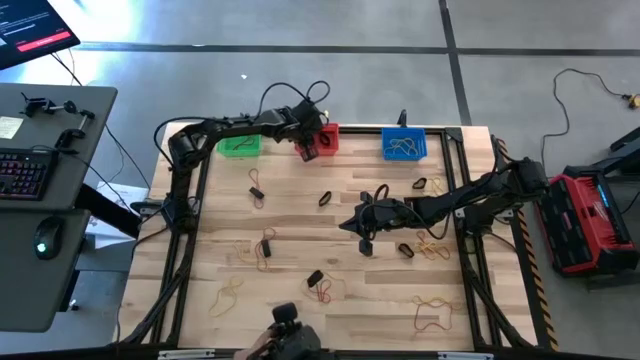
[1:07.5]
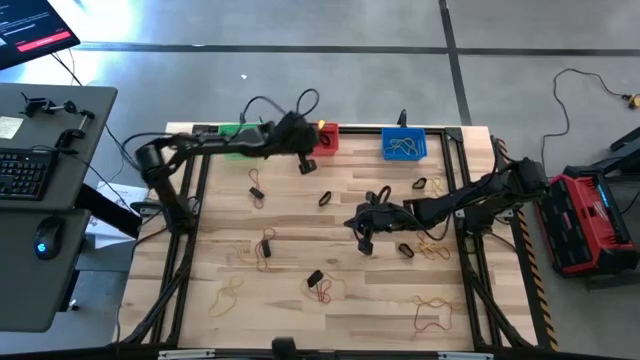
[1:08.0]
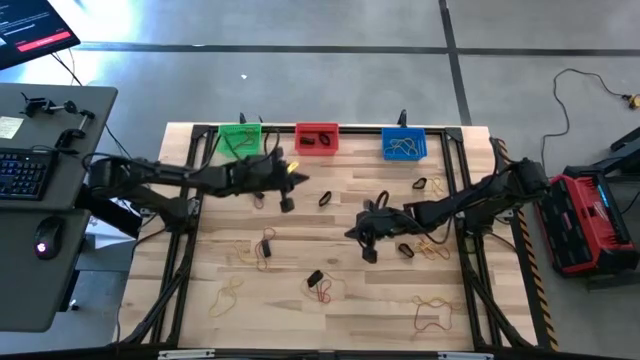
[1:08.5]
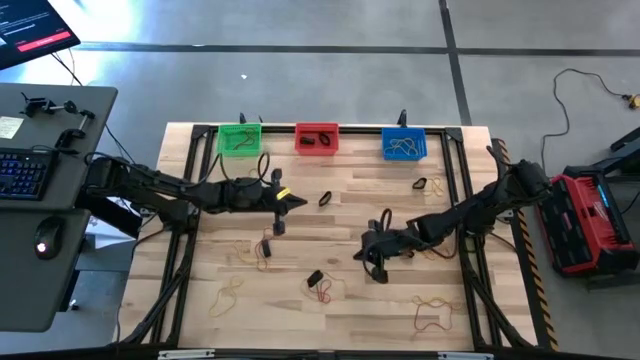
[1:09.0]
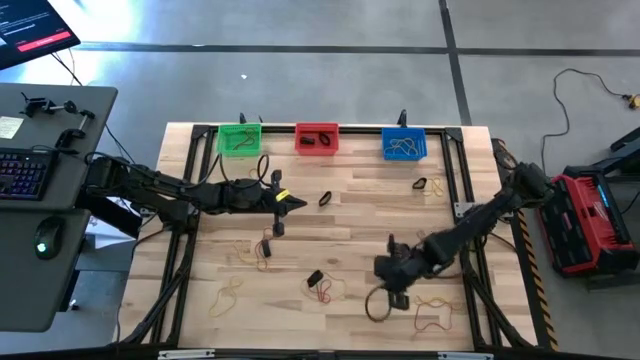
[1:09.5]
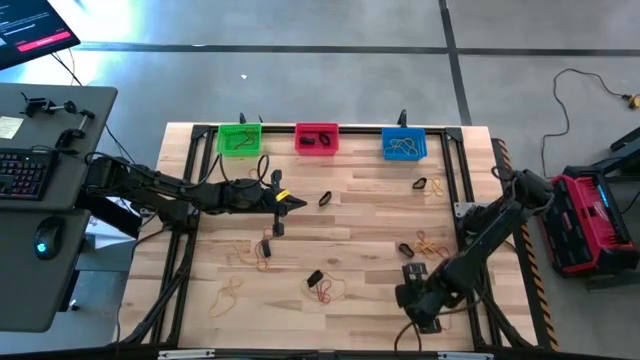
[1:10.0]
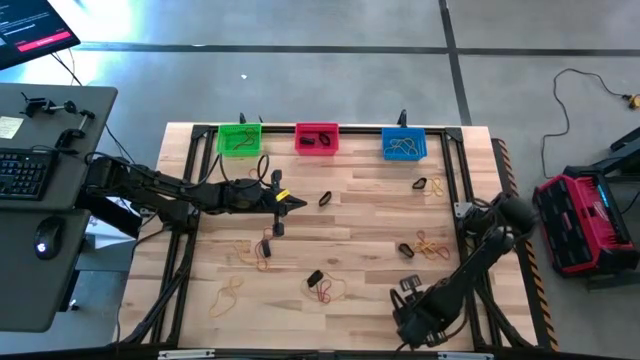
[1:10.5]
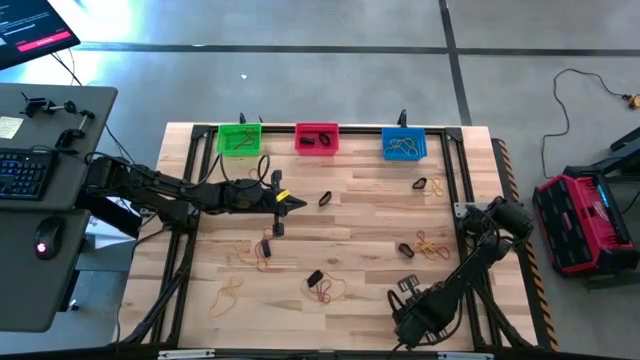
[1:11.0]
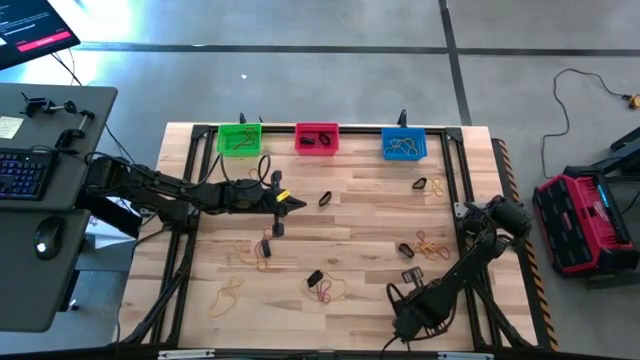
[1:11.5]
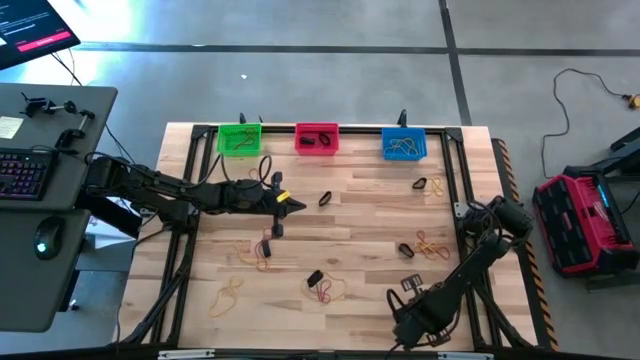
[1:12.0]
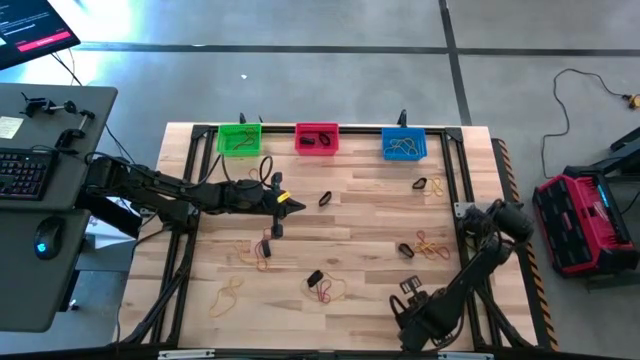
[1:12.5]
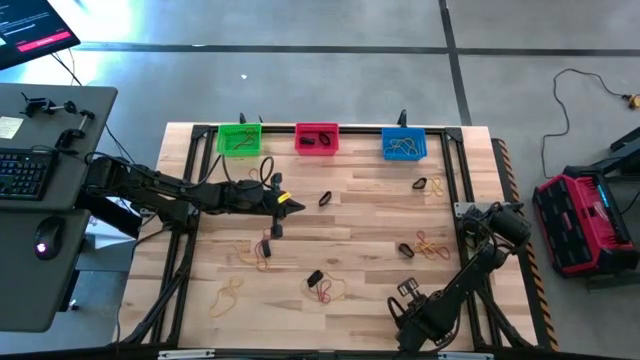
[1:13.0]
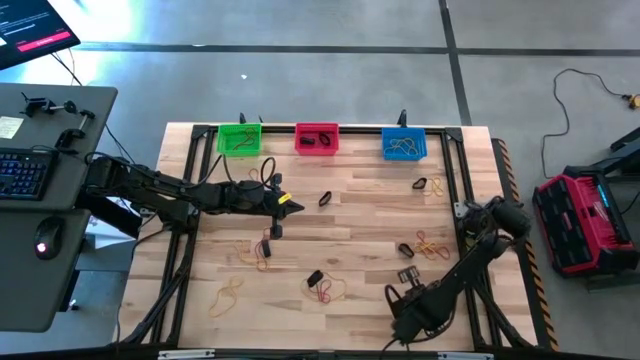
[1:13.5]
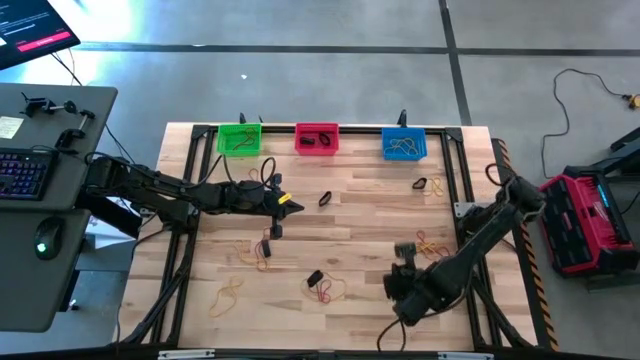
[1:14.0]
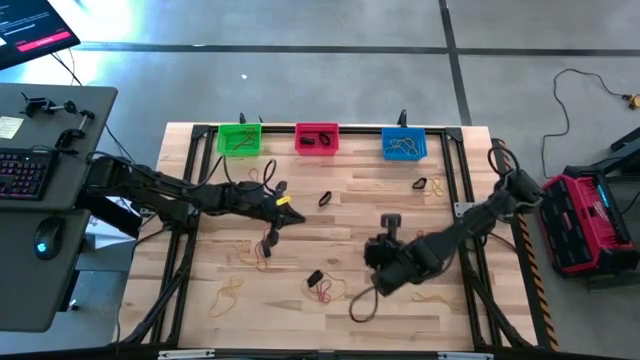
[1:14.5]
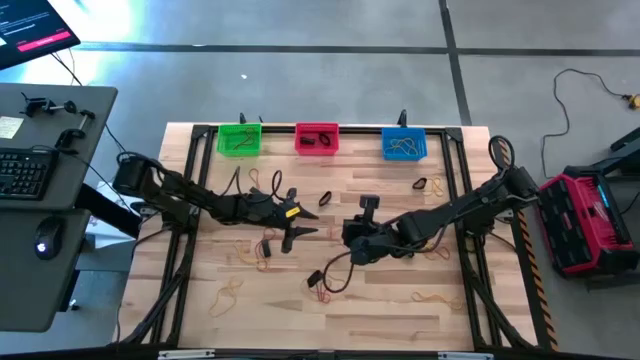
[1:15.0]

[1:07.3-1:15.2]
Task: Sort rubber bands into baskets
Put the red rubber band into the green bin

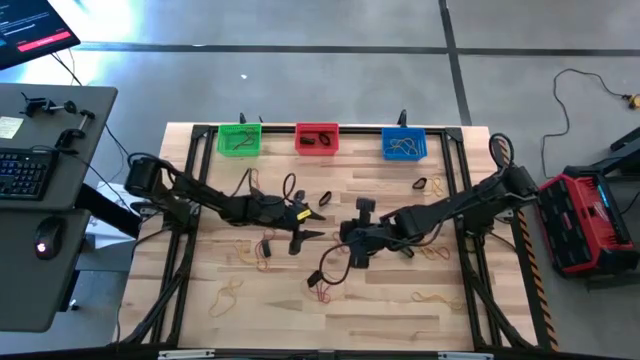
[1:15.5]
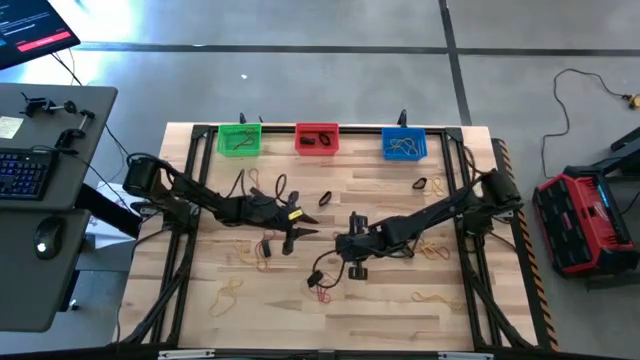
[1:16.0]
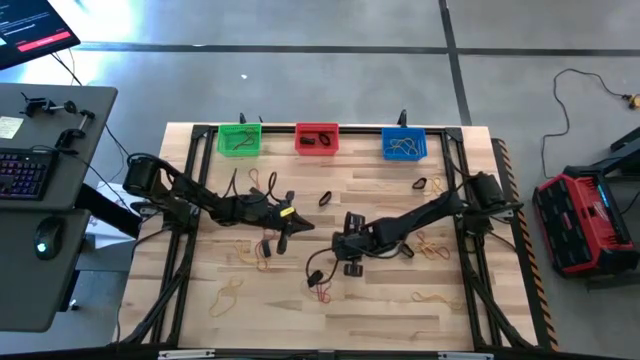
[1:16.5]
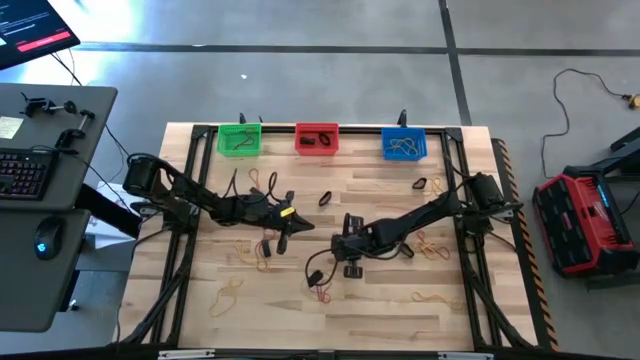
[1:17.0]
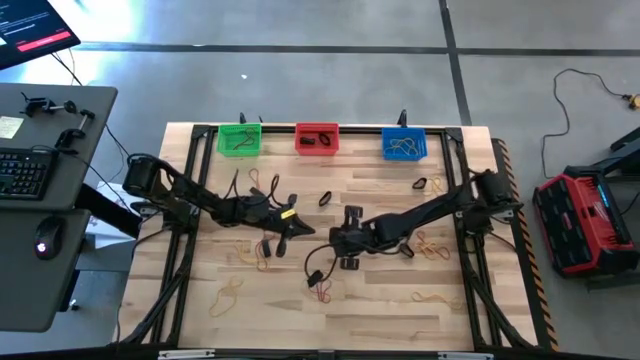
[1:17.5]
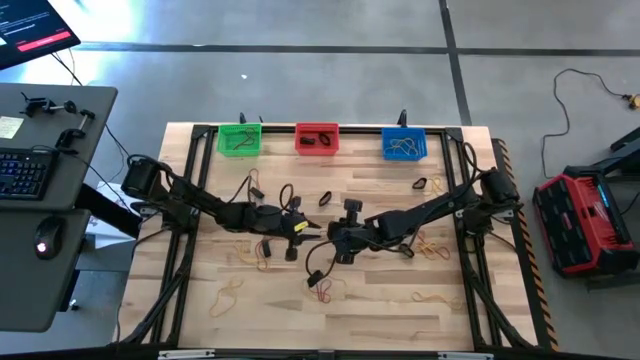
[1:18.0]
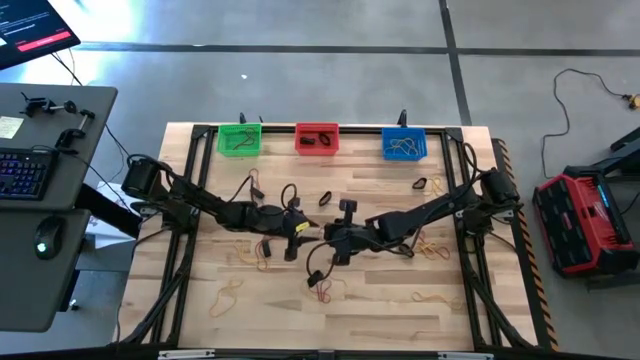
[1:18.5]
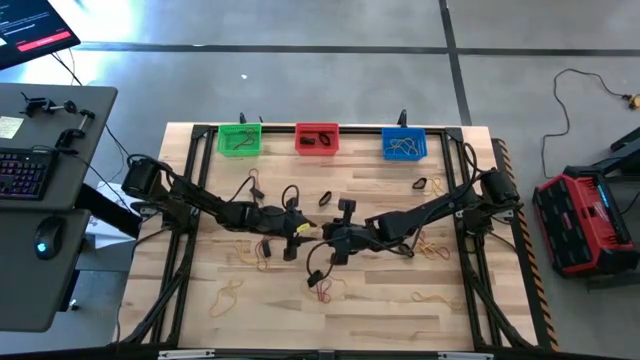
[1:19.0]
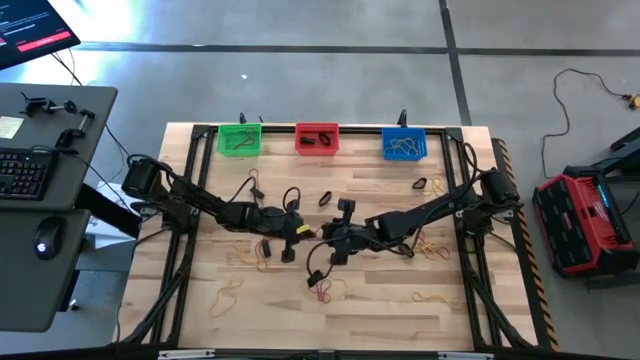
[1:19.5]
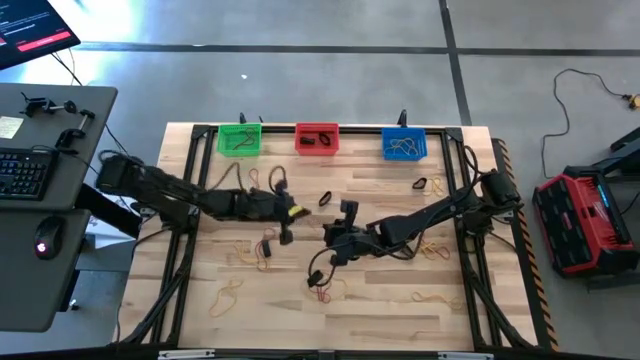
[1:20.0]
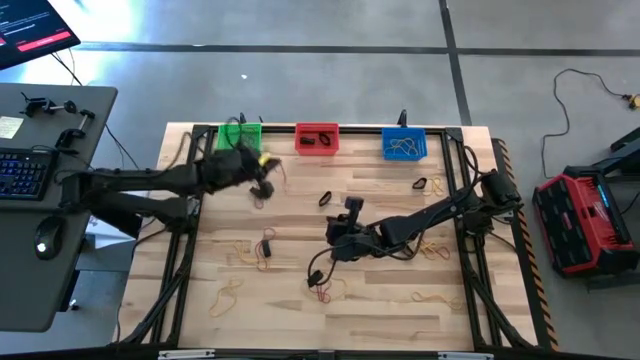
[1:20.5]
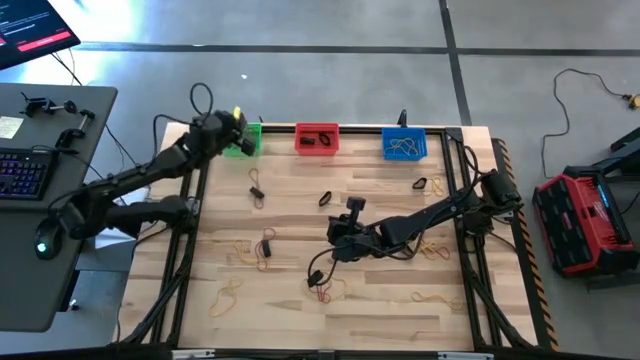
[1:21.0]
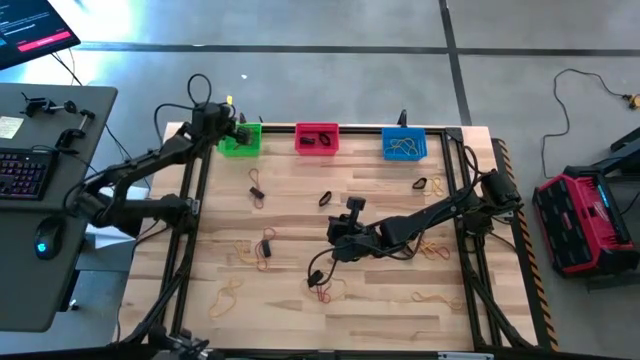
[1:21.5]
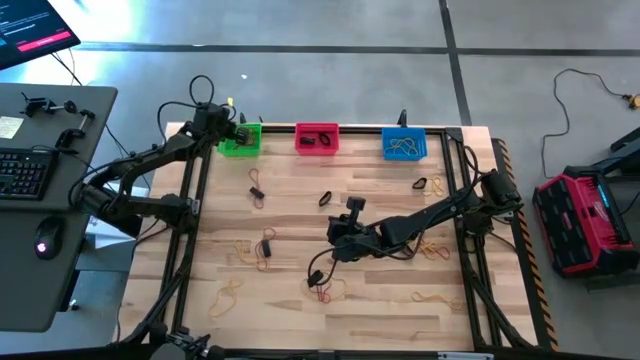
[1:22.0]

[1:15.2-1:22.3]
Put the red rubber band into the green bin

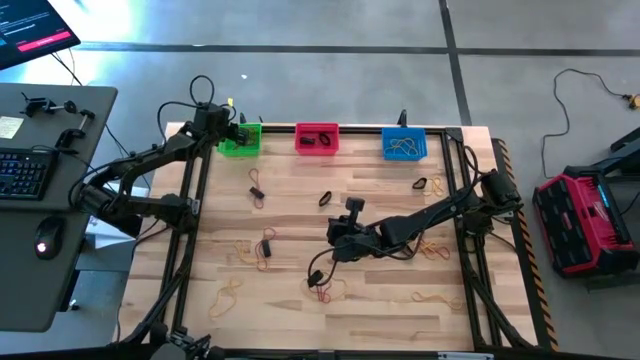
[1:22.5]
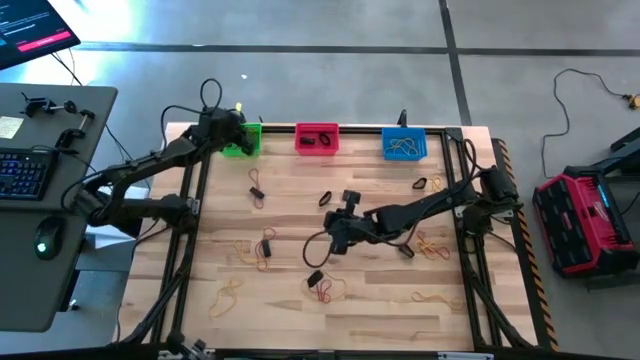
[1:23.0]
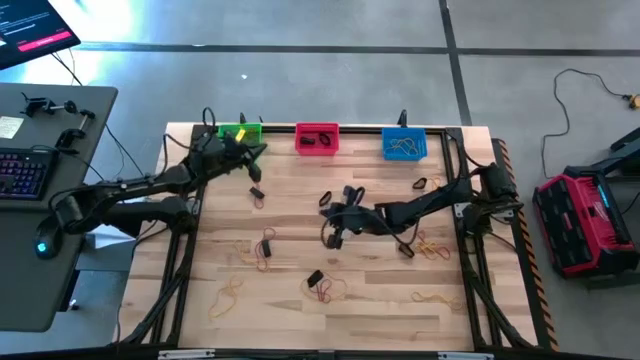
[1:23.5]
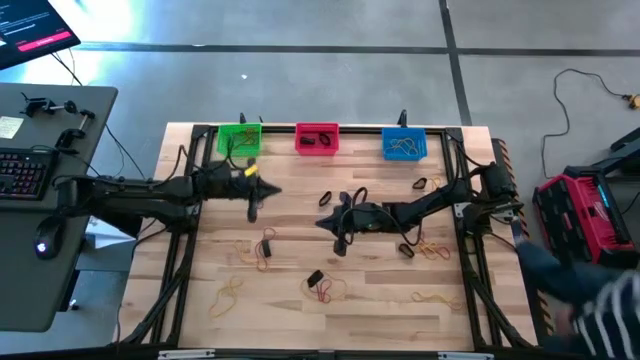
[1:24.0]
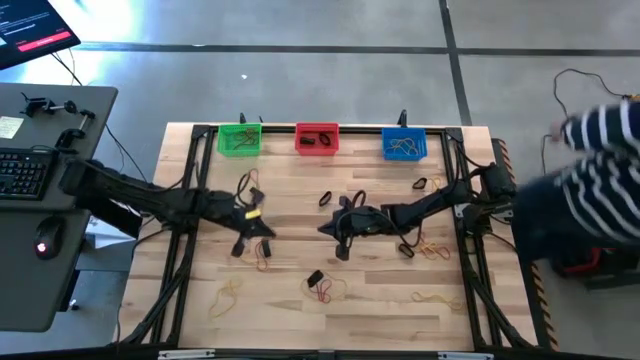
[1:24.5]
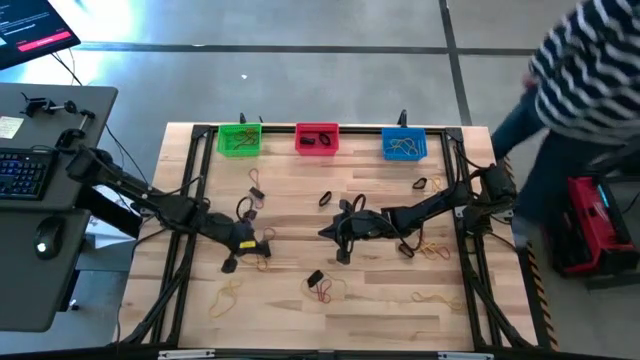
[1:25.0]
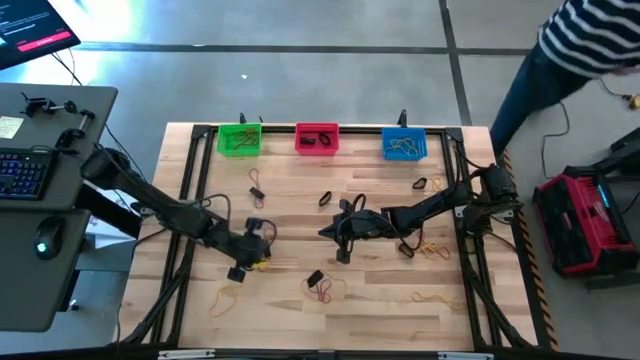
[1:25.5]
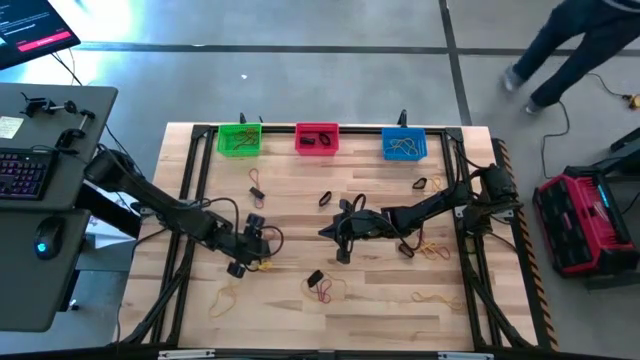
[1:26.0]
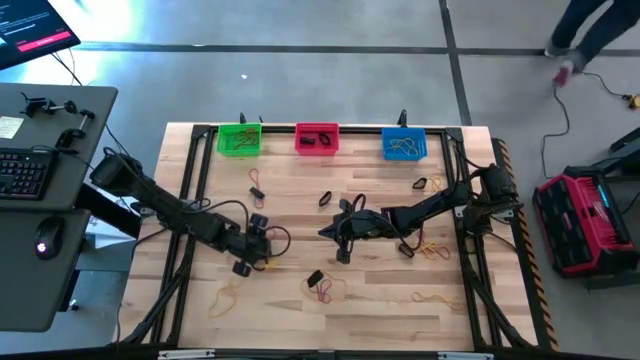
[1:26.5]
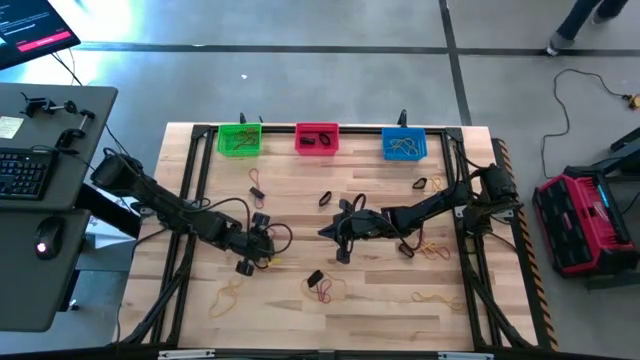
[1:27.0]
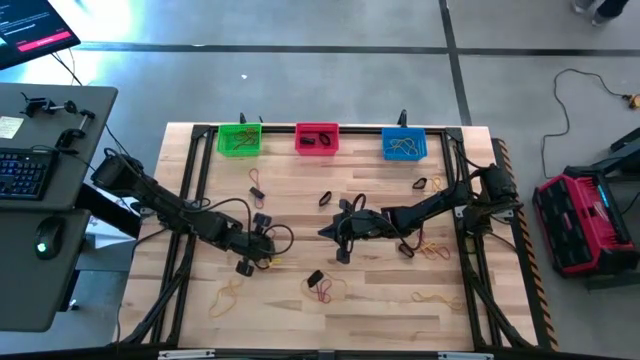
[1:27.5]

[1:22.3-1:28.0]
Put the black rubber band into the red bin
